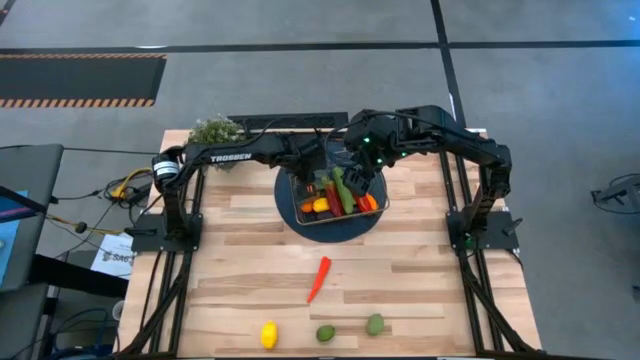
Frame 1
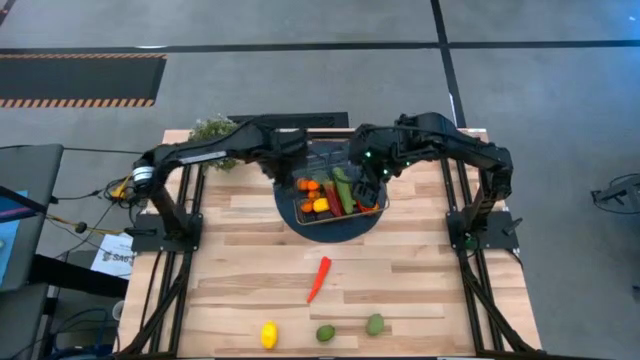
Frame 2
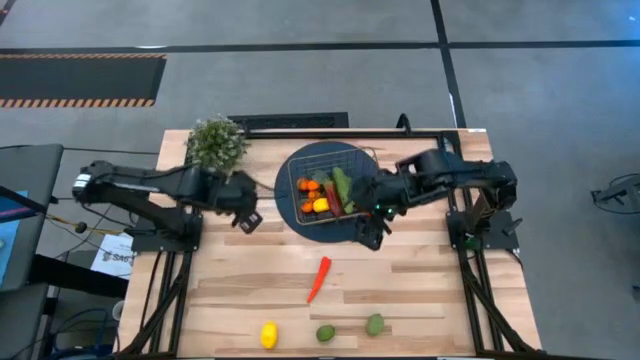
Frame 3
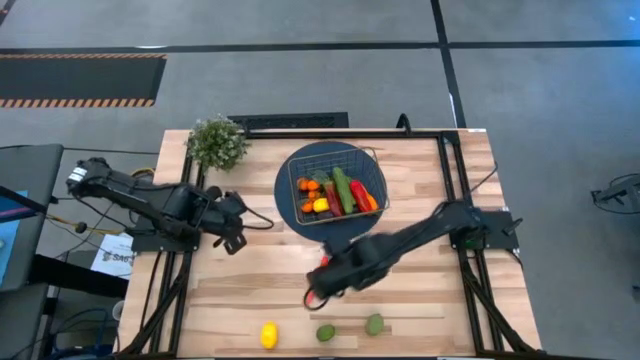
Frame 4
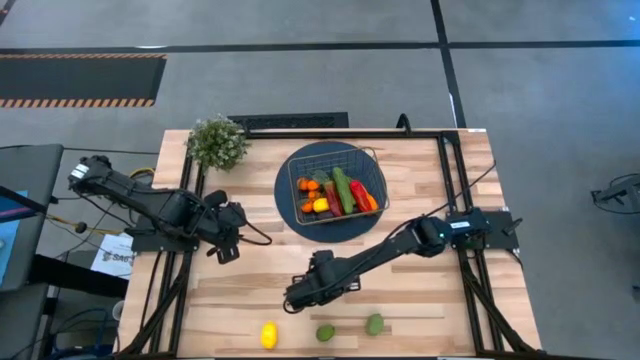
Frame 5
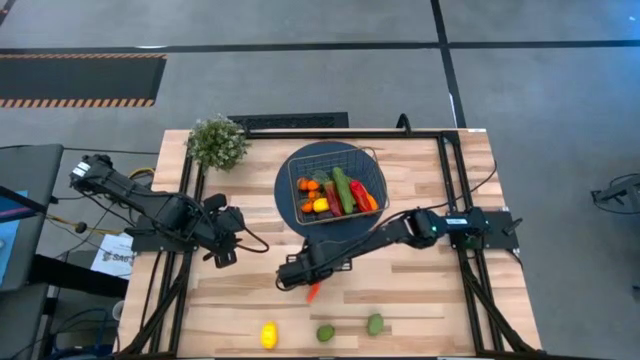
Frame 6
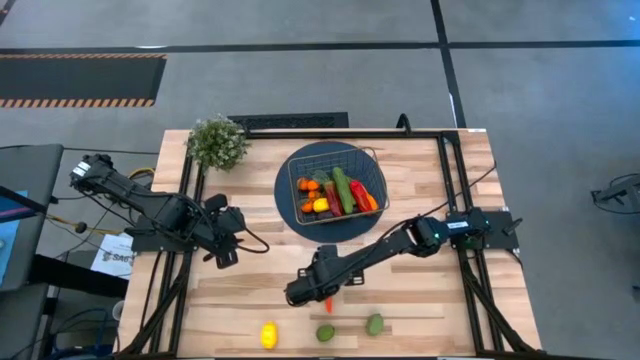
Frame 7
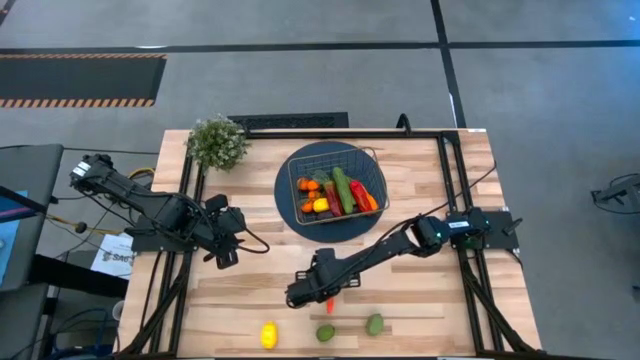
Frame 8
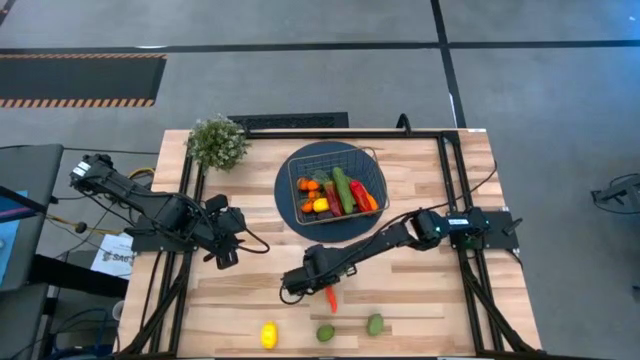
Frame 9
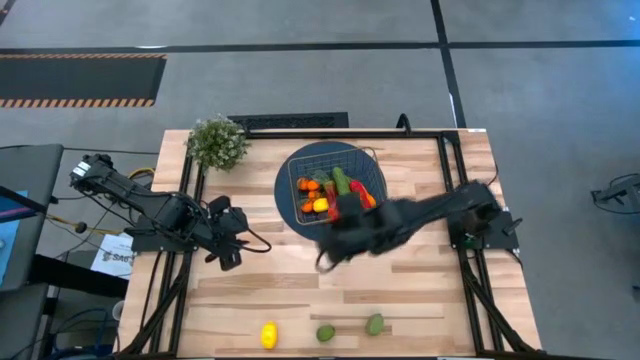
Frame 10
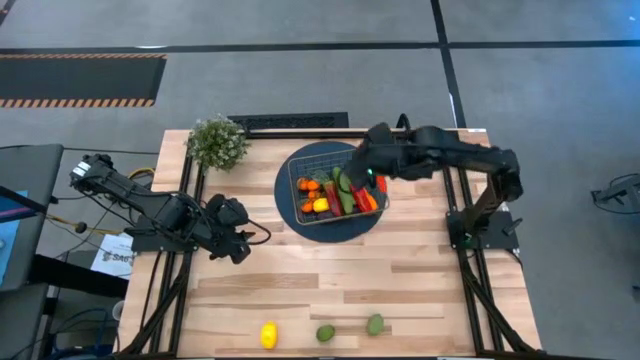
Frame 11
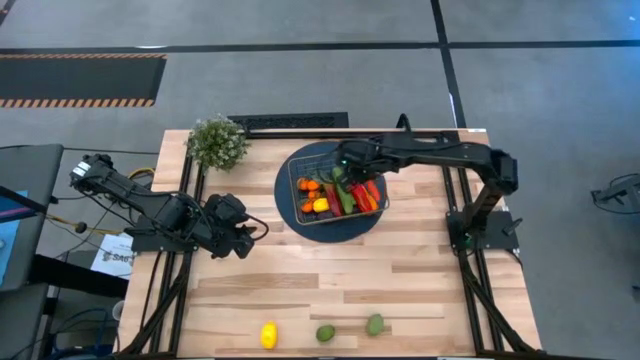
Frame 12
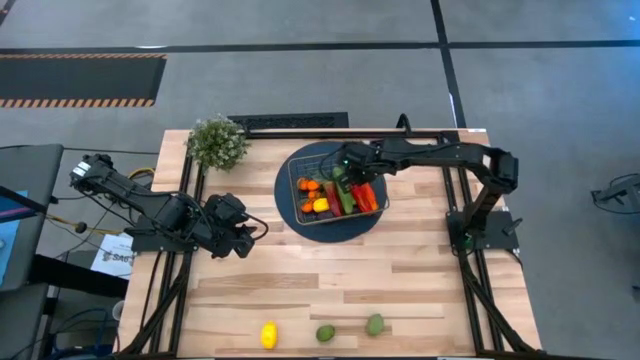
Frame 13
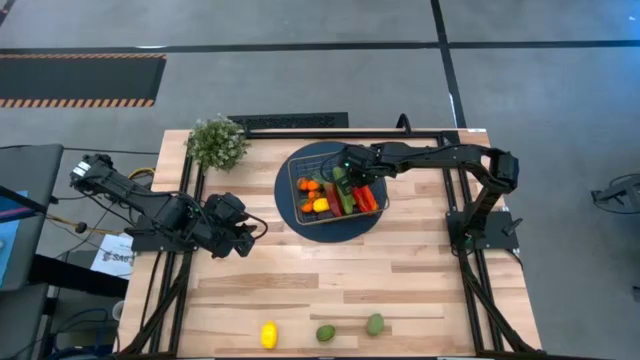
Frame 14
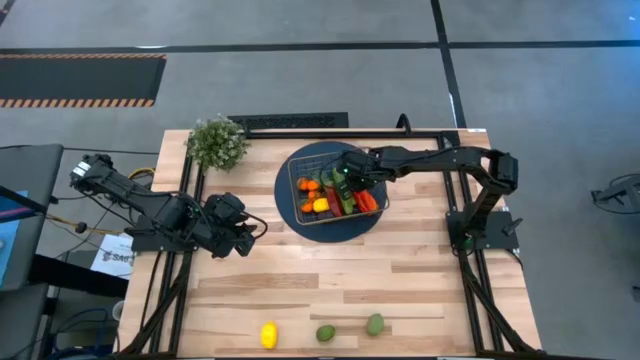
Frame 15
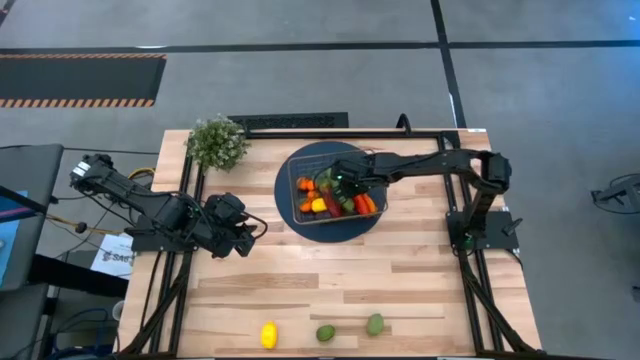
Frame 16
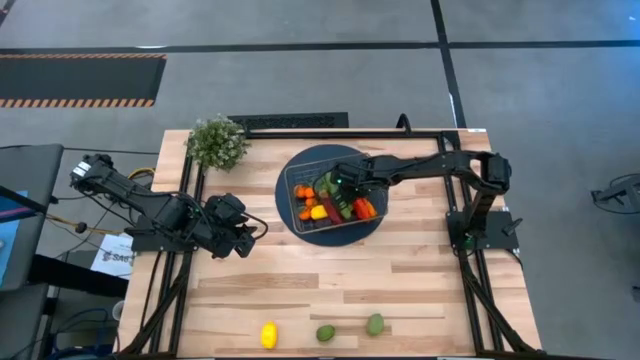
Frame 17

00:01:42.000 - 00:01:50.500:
Task: Build produce basket
Put the carrot into the basket

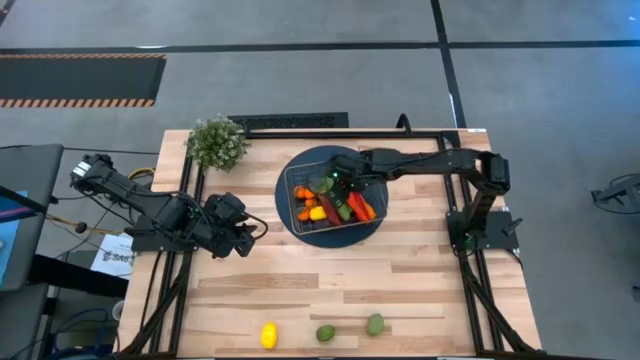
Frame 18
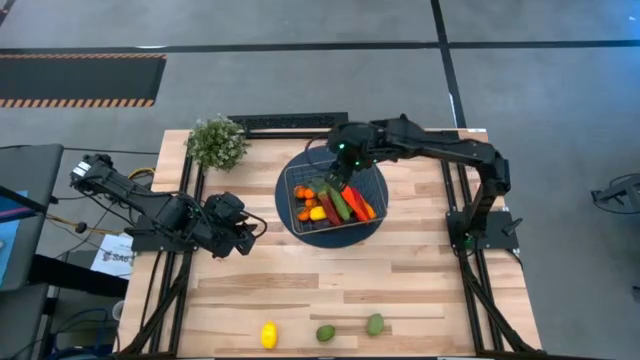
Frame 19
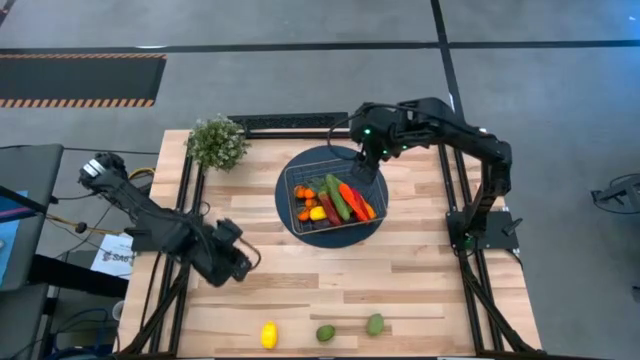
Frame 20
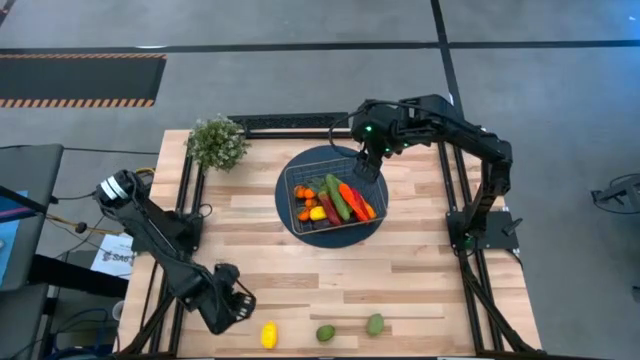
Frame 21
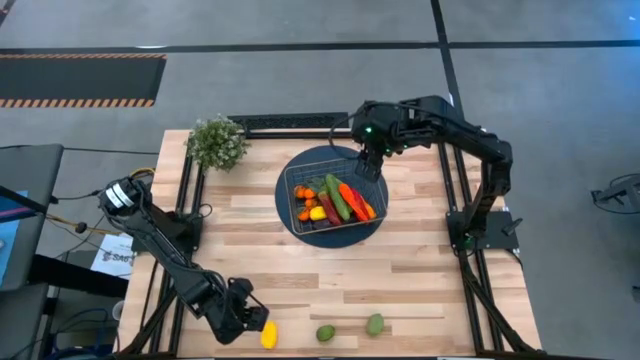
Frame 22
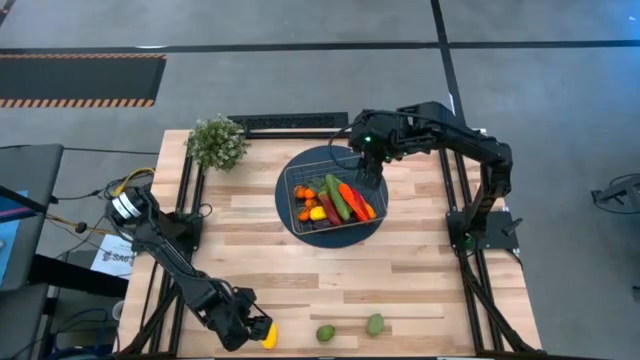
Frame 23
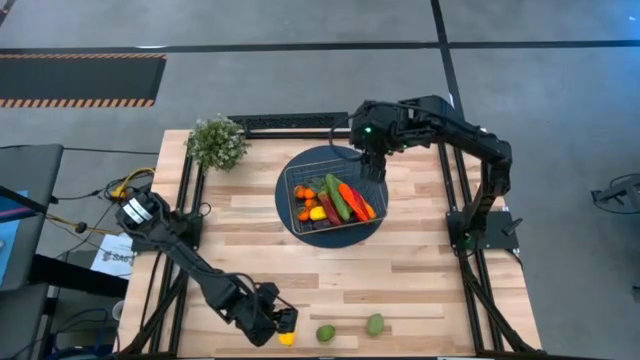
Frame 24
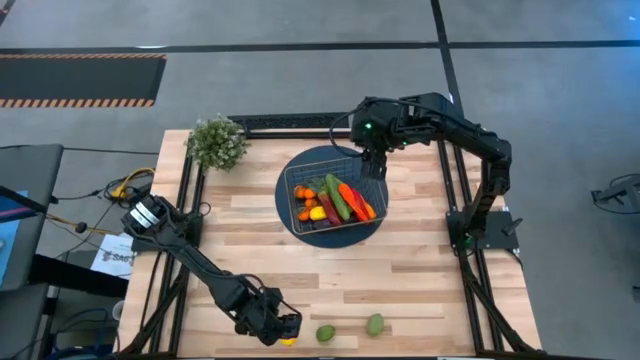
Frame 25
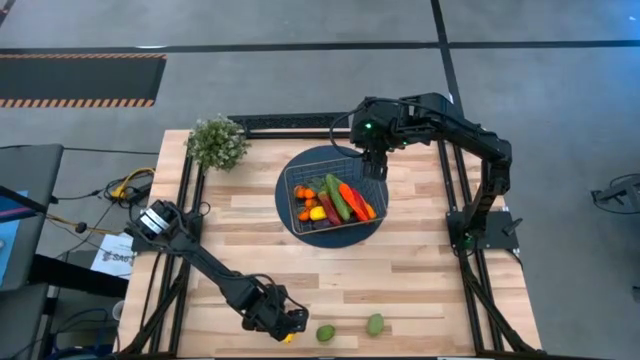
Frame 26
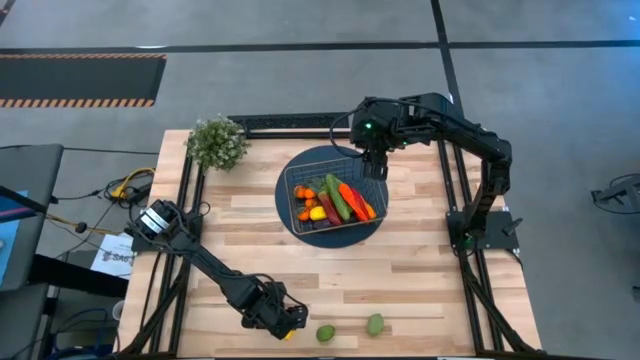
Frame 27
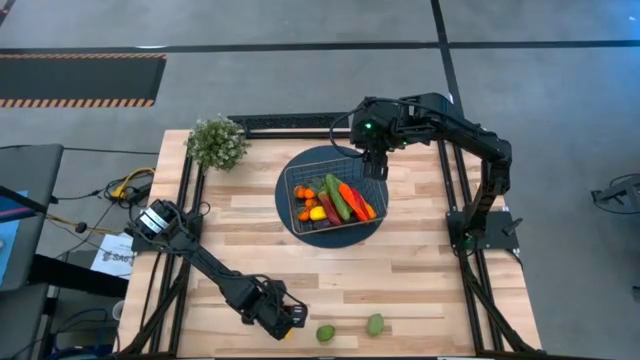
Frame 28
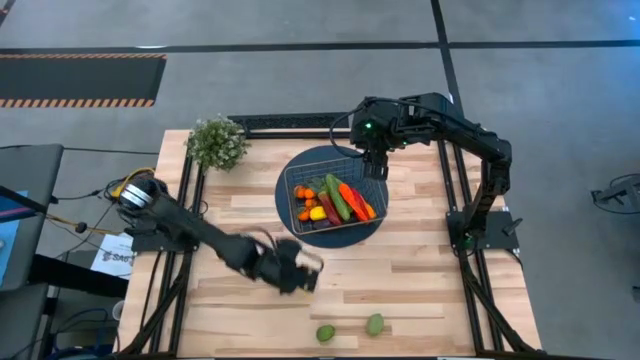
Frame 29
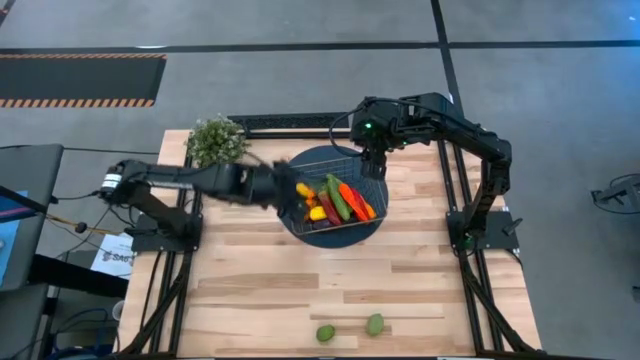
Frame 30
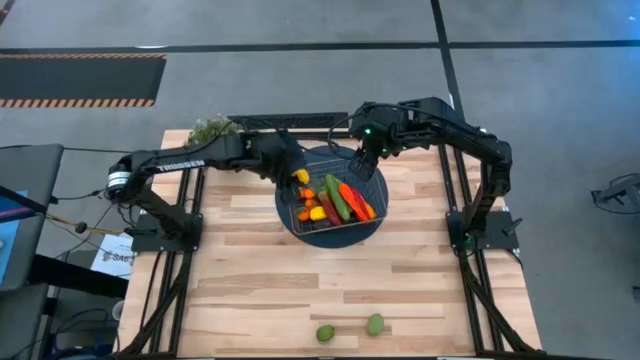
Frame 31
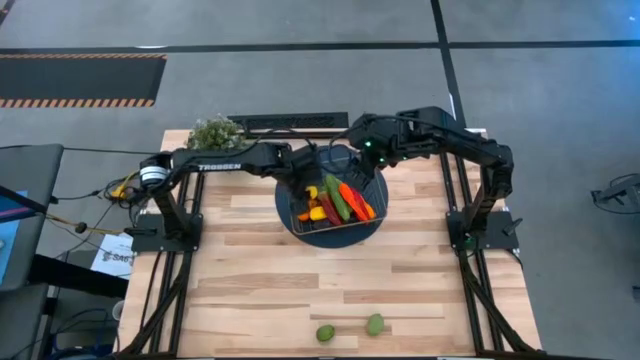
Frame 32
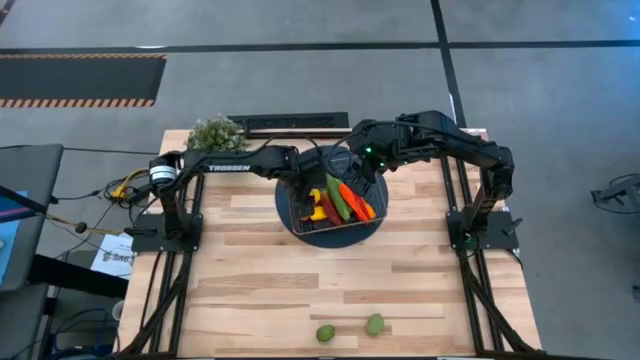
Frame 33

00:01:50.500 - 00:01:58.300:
Put the yellow lemon into the basket

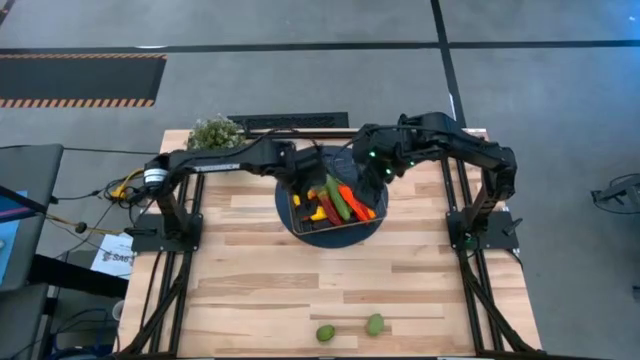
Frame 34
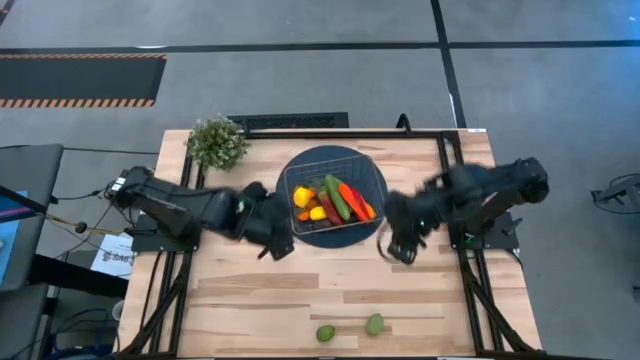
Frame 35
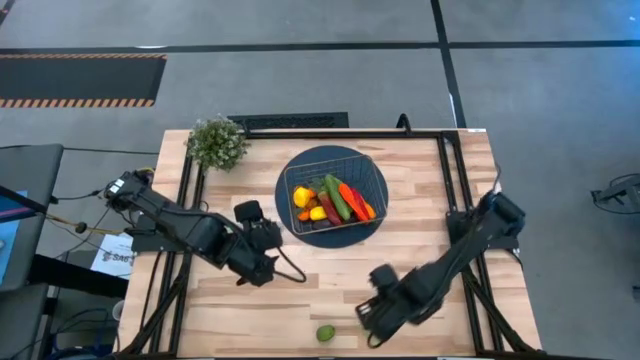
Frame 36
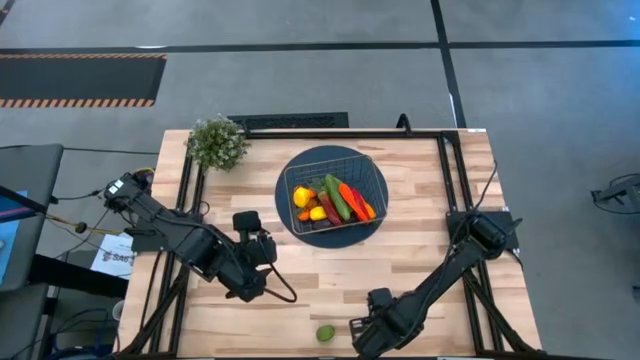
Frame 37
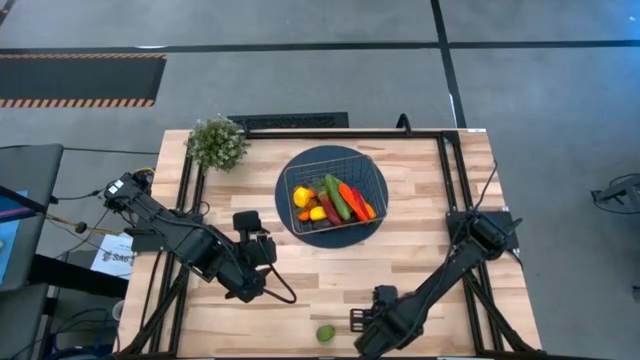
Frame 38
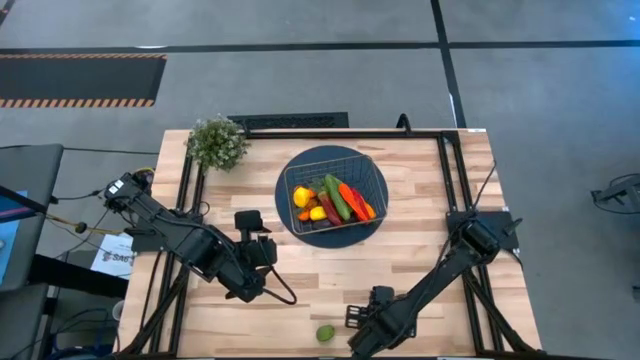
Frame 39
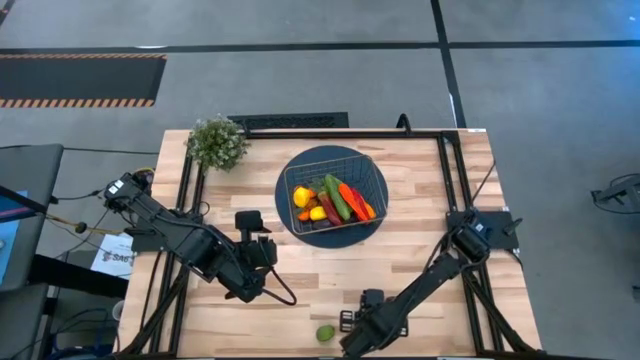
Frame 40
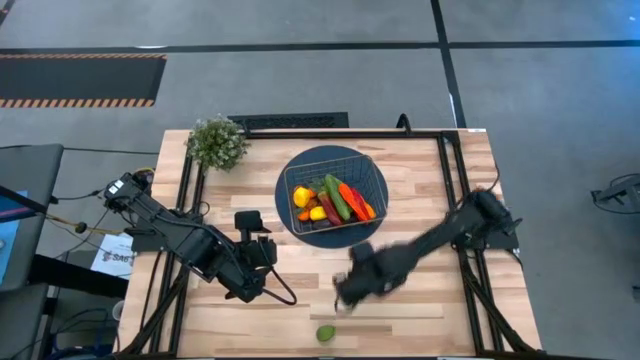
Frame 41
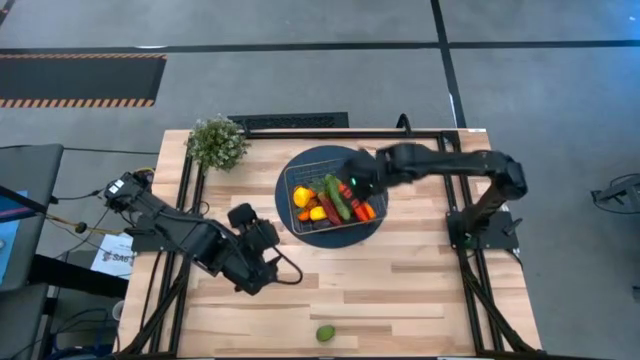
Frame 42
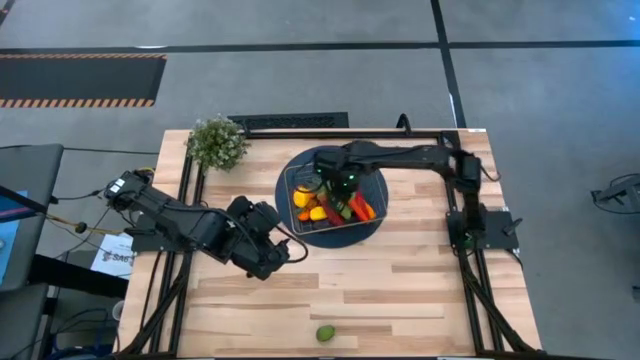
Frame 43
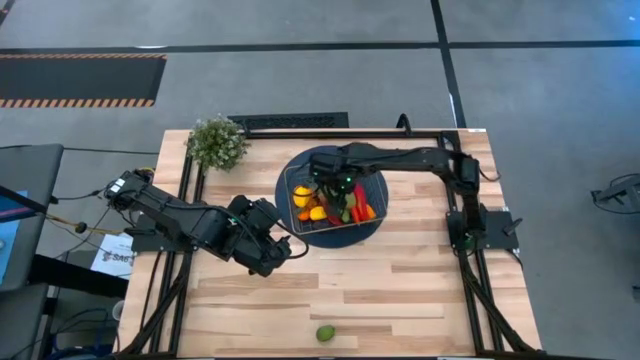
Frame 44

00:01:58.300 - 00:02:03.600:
Put the left green lemon into the basket
